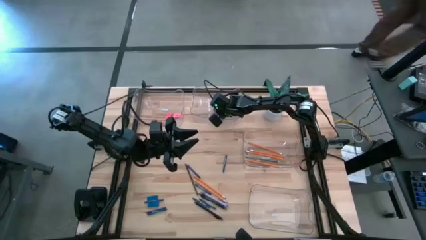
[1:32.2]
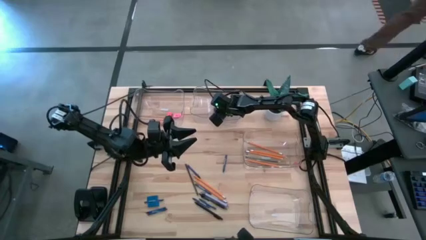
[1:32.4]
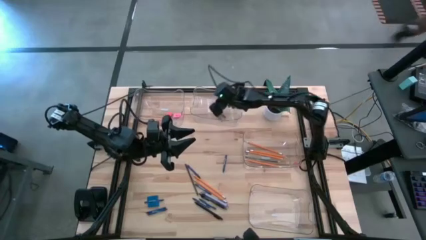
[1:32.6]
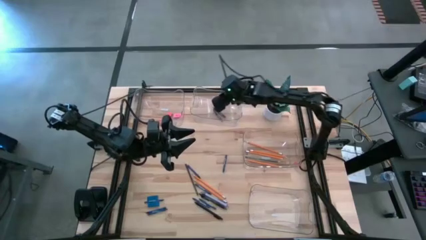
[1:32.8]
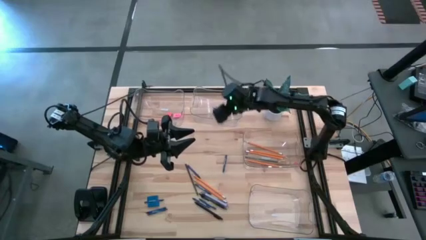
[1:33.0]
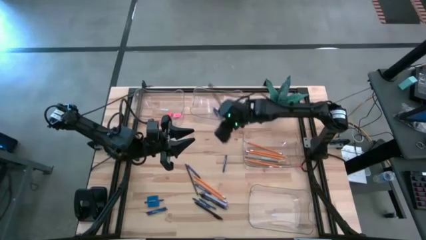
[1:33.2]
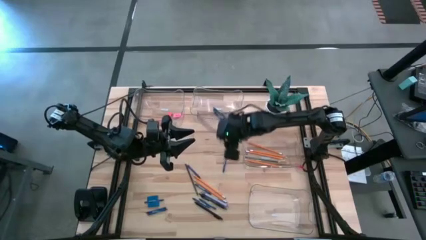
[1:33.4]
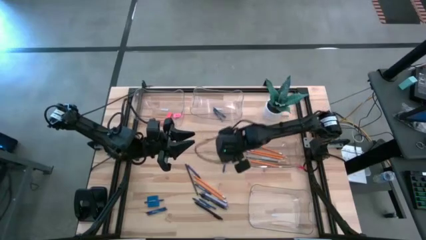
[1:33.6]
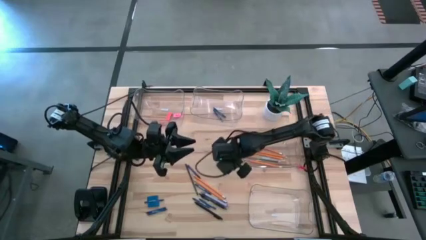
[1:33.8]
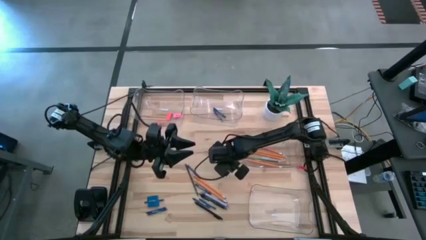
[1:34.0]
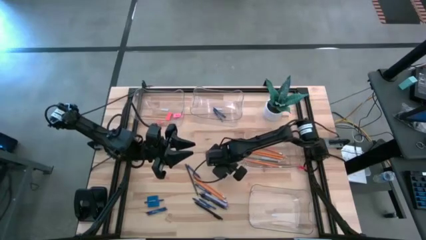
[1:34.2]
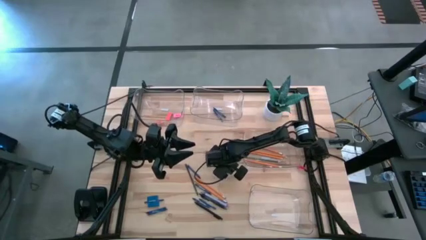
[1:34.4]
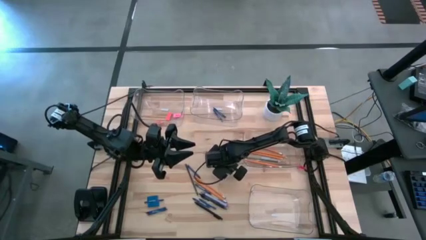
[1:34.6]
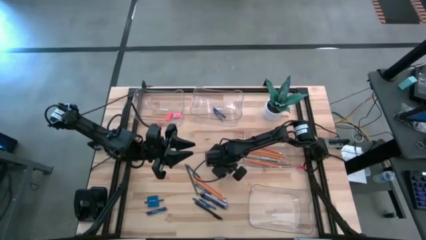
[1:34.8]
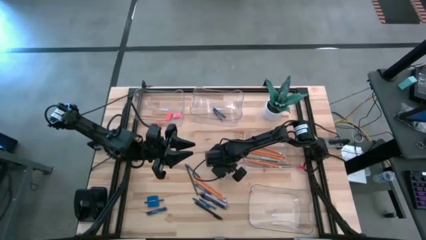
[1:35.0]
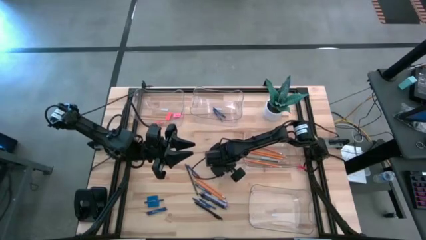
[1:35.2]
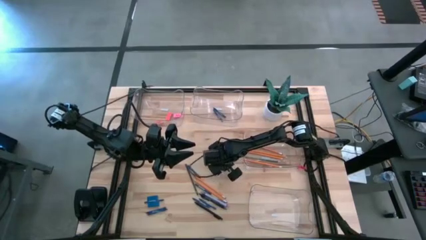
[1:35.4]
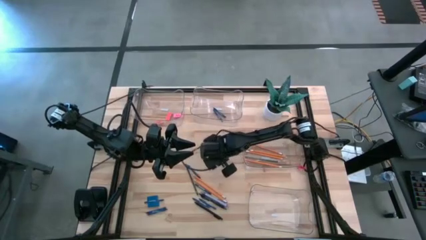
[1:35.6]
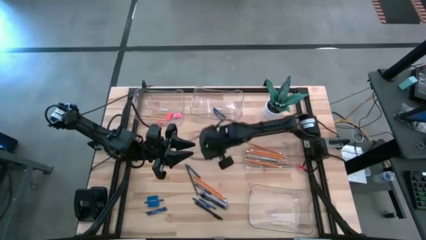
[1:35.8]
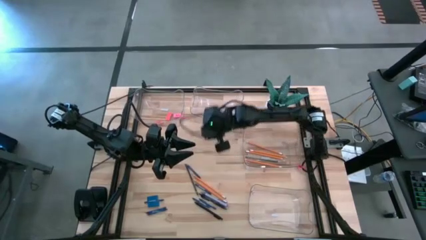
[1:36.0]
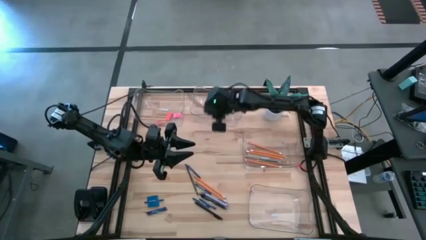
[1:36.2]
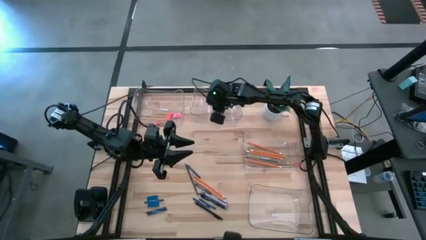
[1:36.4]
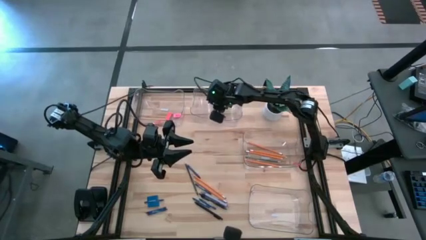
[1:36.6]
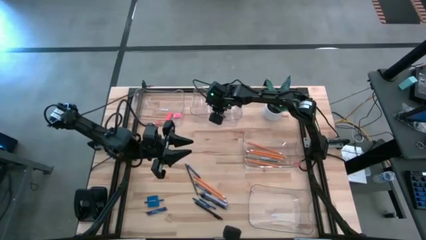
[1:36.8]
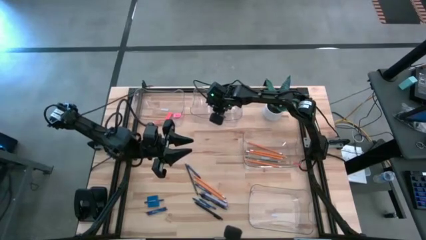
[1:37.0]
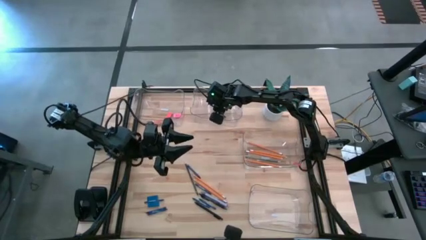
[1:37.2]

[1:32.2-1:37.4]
Task: Sort crayons/erasers/pens/pencils in bins
Put the blue crayon into the top right transparent bin

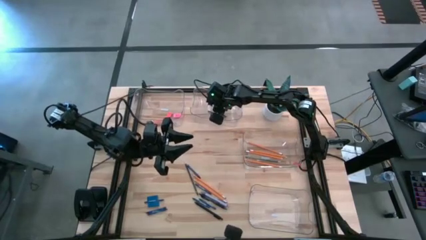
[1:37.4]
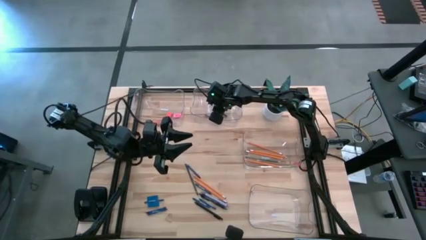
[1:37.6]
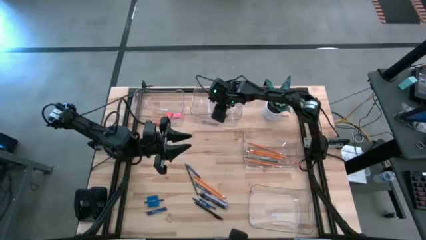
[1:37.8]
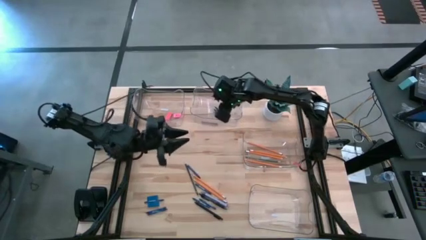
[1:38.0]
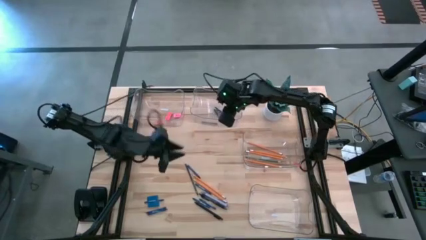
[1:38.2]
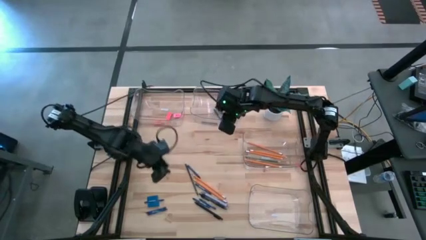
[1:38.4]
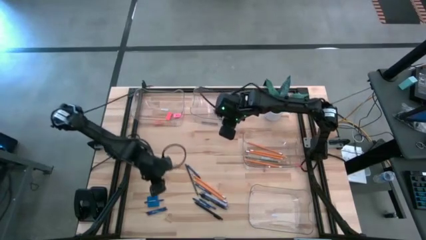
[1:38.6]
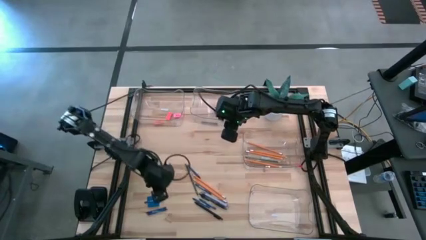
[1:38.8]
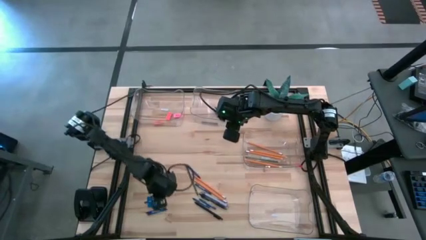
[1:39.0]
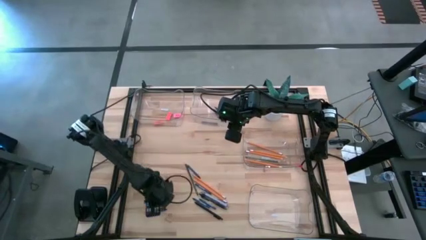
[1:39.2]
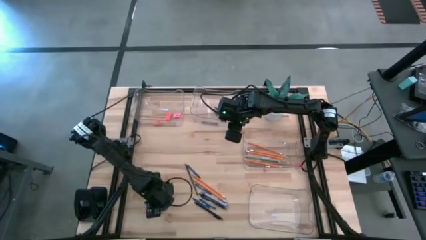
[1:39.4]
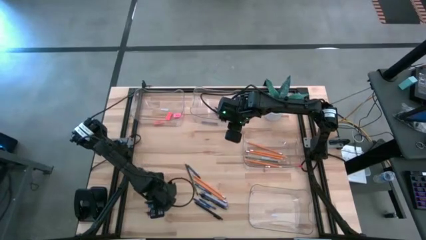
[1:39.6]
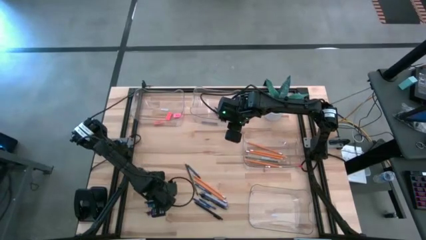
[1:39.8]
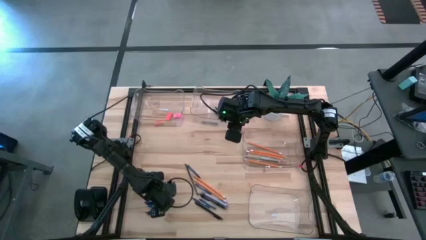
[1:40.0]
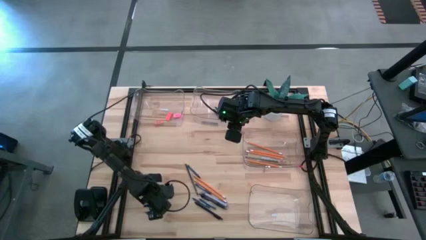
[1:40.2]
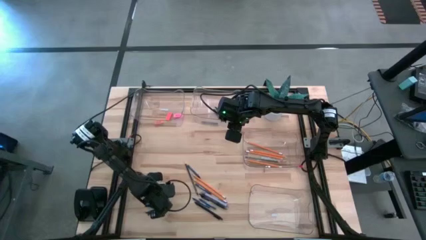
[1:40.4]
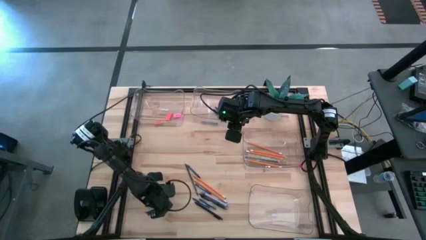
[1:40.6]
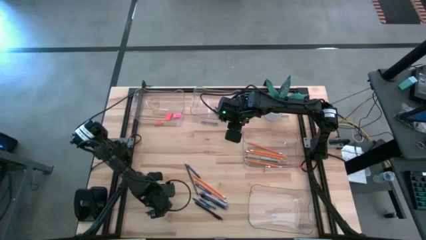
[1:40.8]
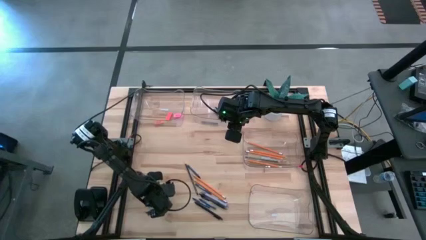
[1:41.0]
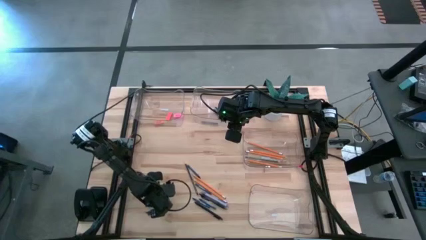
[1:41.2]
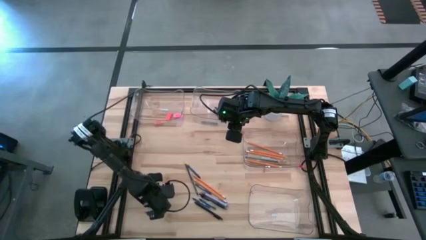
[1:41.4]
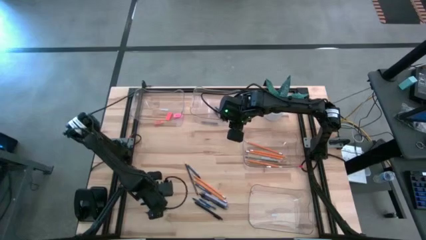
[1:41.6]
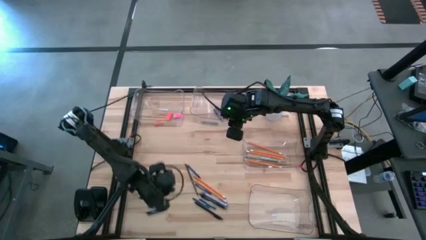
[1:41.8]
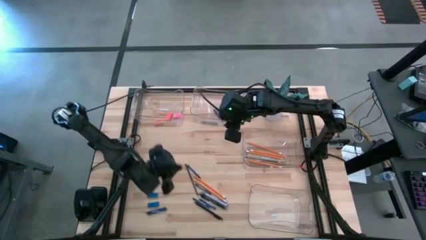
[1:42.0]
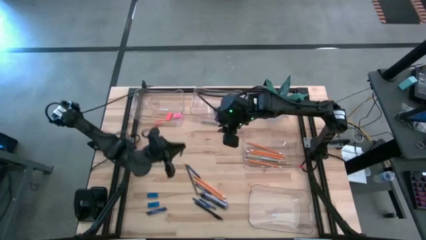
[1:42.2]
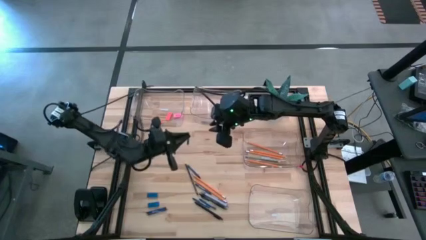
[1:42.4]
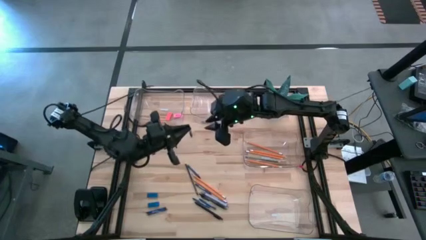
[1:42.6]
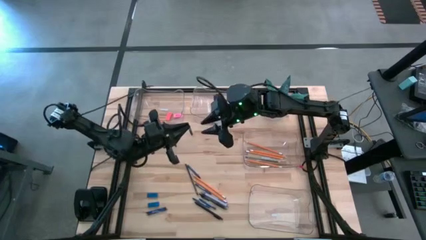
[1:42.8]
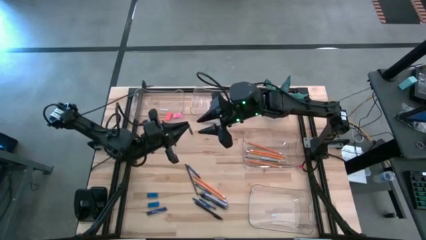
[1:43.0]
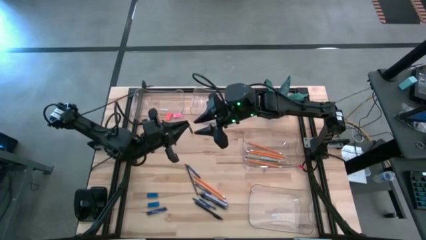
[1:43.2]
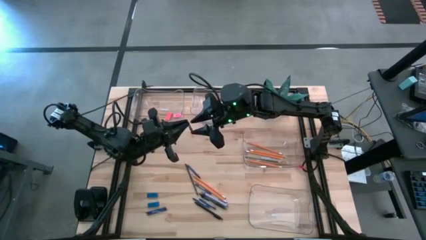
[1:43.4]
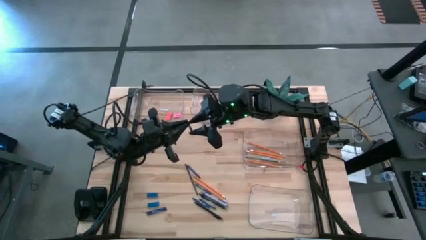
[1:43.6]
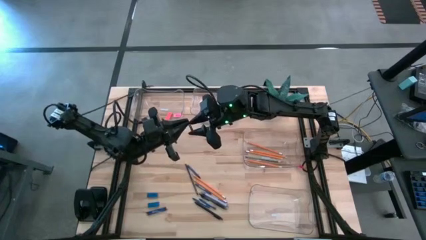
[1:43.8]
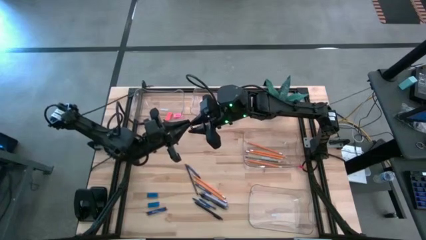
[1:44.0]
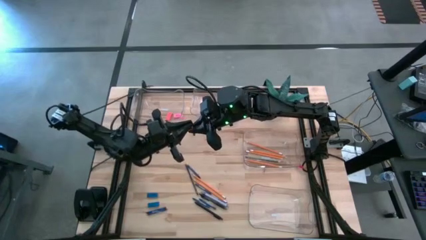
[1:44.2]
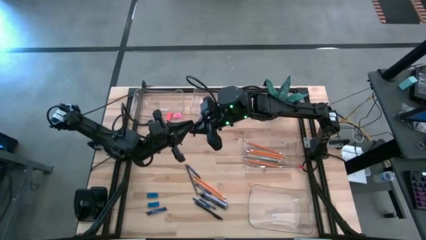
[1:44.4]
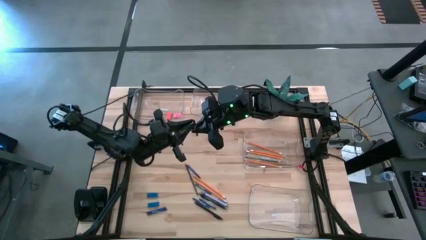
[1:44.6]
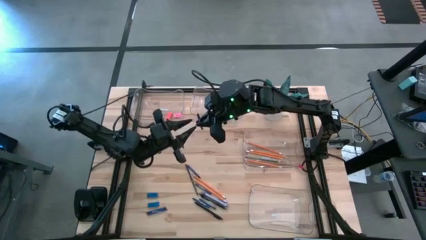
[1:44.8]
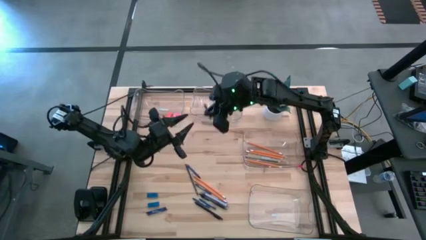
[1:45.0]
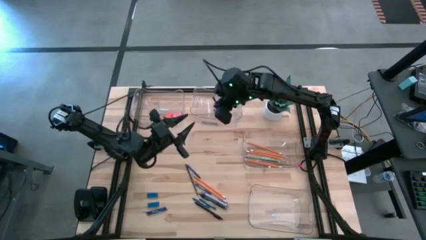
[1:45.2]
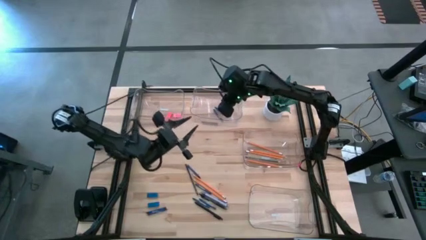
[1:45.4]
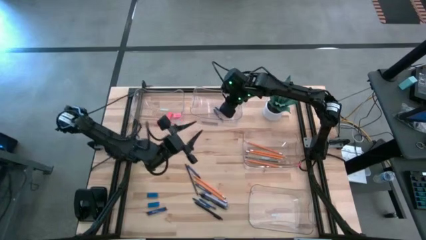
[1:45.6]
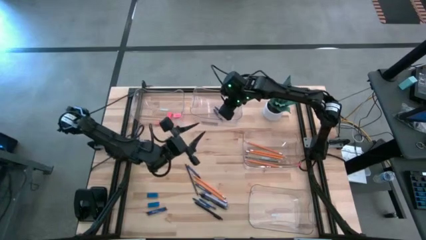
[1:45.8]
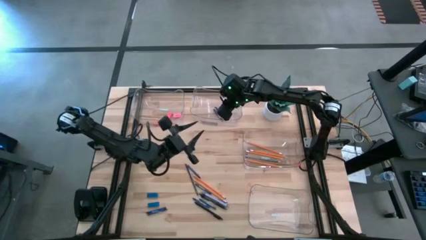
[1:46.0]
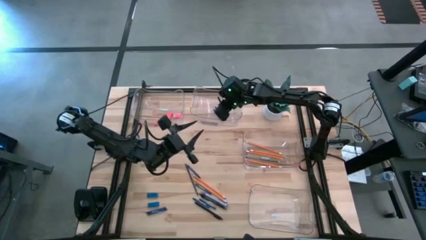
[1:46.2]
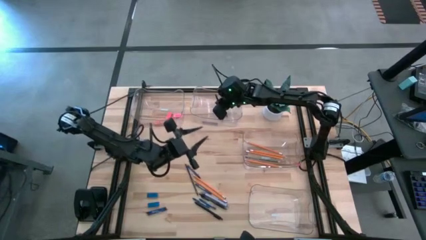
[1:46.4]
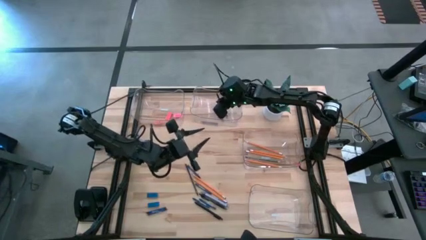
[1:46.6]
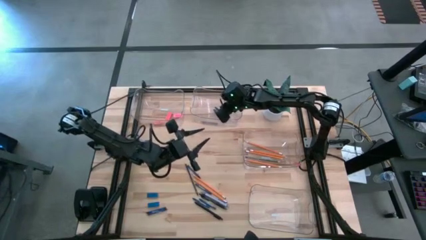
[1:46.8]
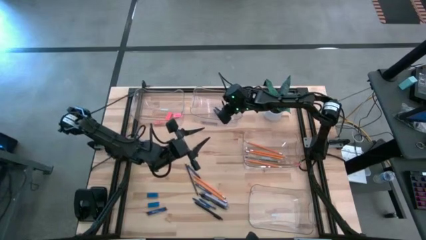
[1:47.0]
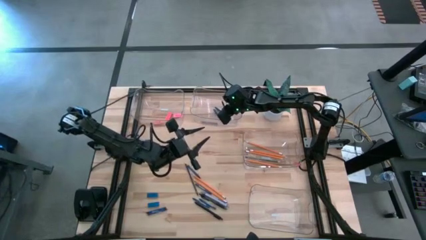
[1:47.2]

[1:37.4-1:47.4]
Put the blue crayon into the top right transparent bin
